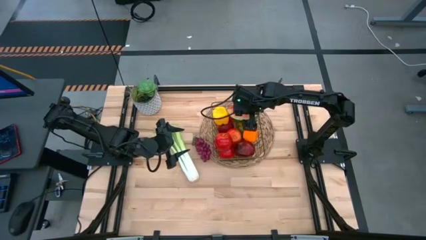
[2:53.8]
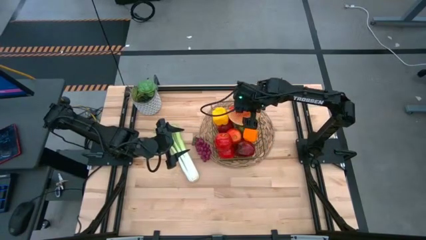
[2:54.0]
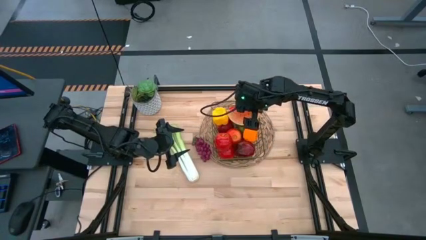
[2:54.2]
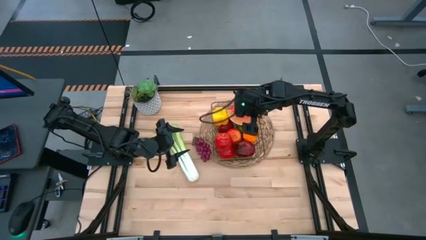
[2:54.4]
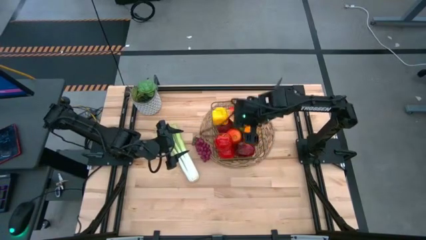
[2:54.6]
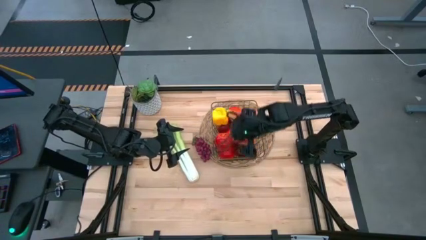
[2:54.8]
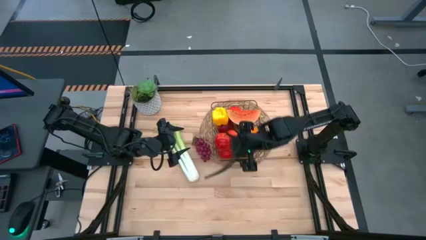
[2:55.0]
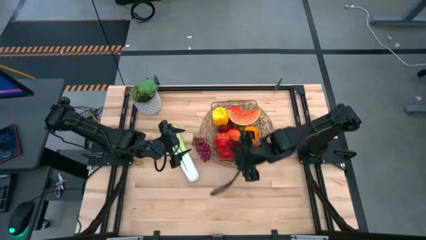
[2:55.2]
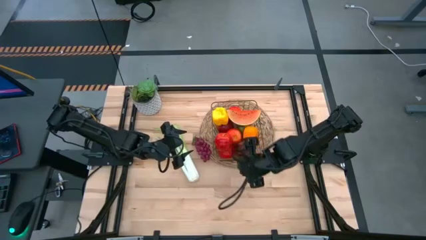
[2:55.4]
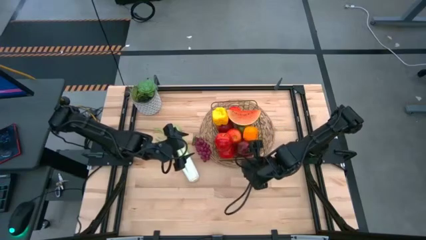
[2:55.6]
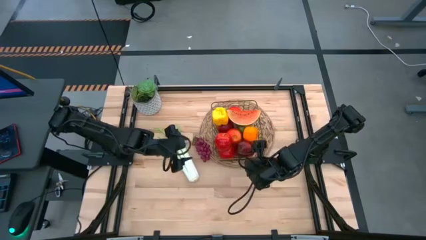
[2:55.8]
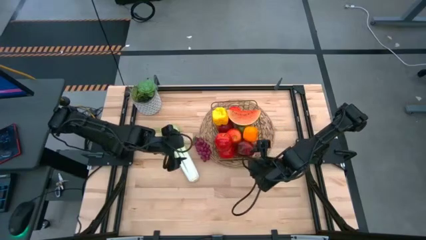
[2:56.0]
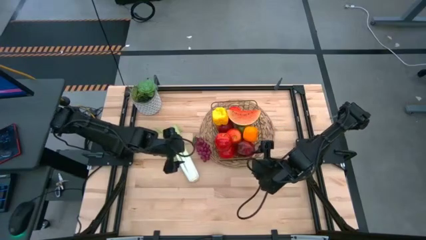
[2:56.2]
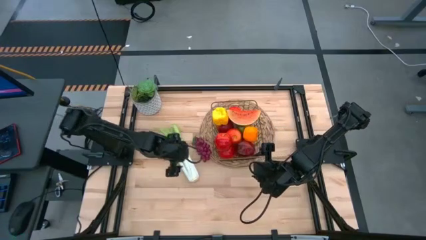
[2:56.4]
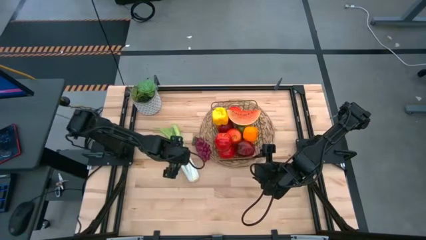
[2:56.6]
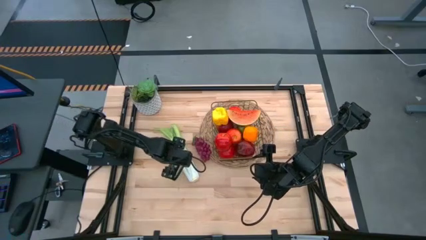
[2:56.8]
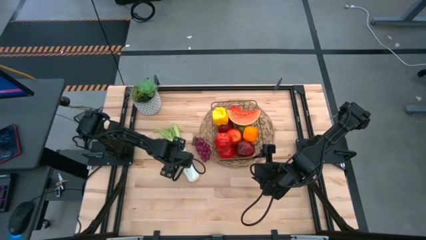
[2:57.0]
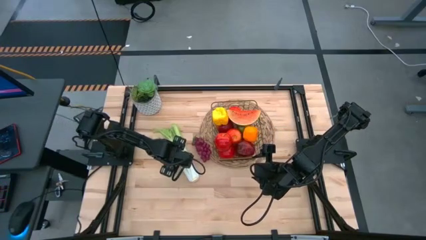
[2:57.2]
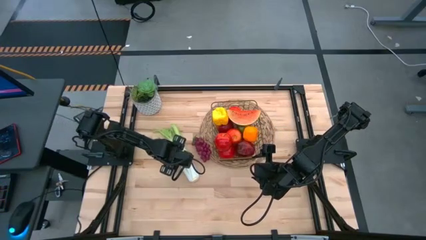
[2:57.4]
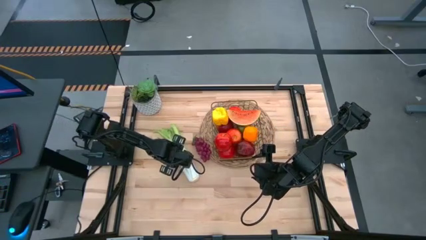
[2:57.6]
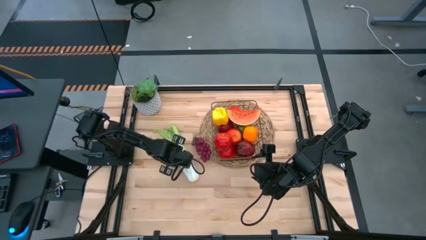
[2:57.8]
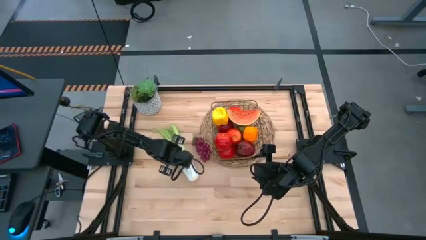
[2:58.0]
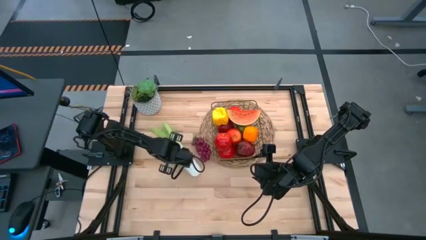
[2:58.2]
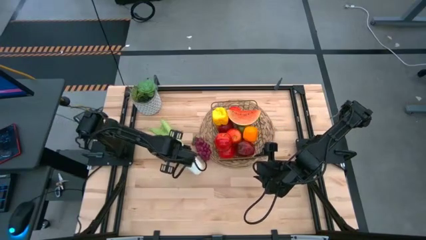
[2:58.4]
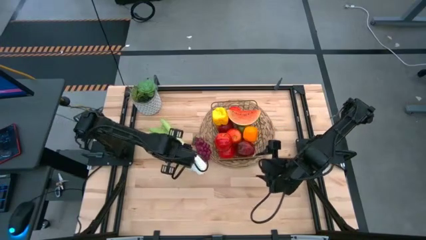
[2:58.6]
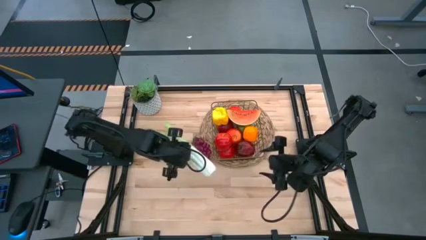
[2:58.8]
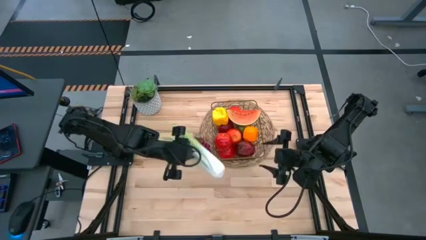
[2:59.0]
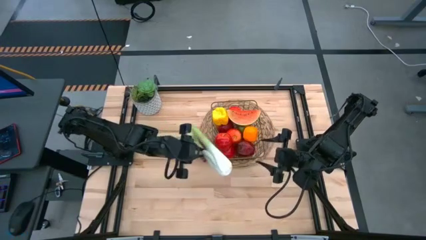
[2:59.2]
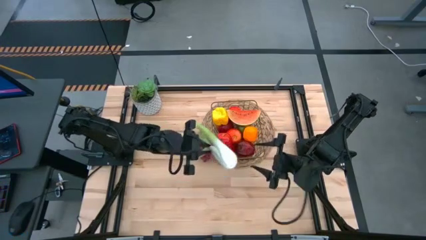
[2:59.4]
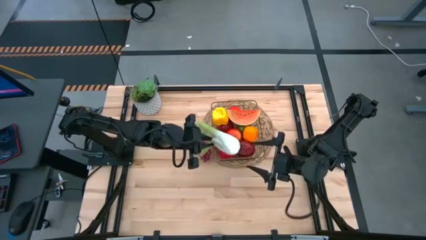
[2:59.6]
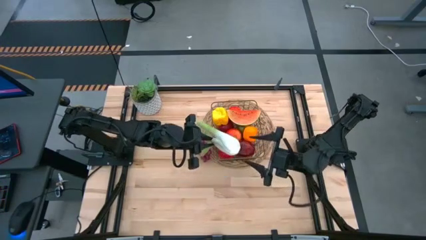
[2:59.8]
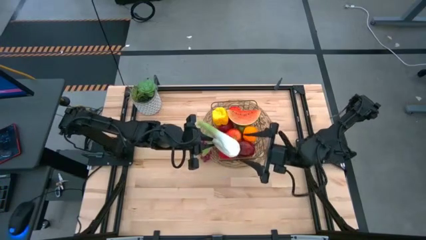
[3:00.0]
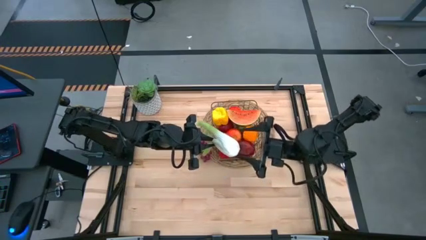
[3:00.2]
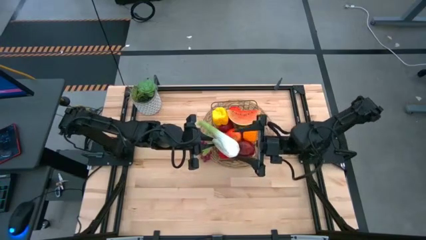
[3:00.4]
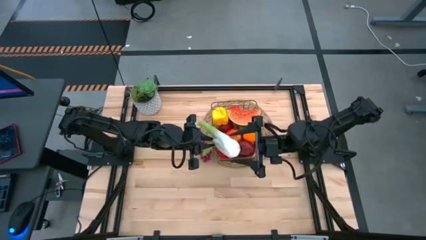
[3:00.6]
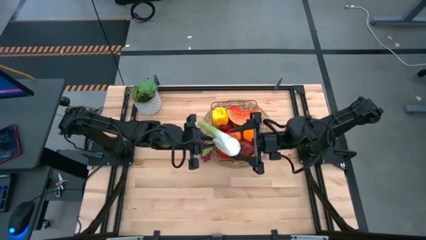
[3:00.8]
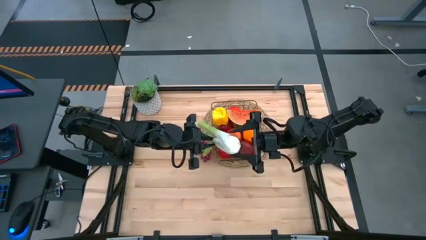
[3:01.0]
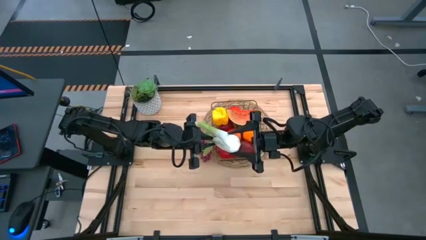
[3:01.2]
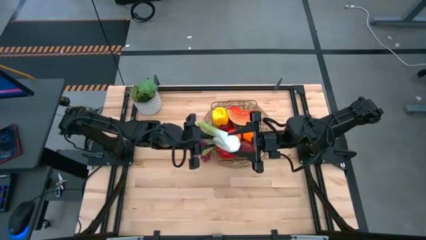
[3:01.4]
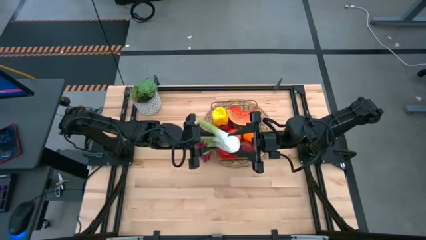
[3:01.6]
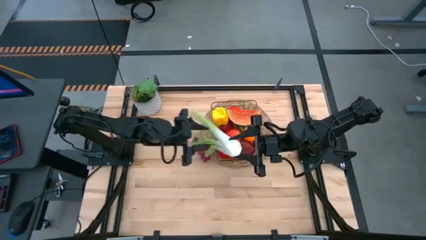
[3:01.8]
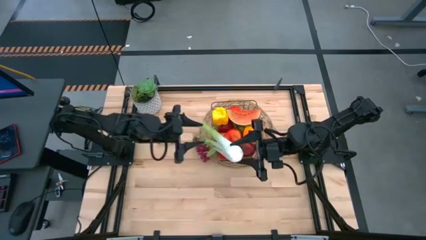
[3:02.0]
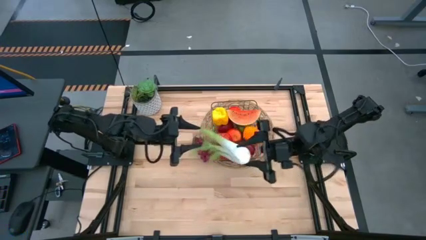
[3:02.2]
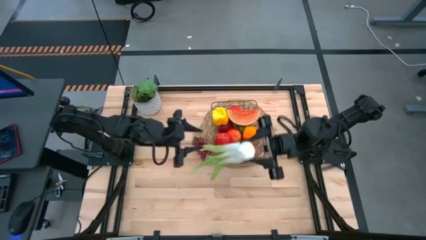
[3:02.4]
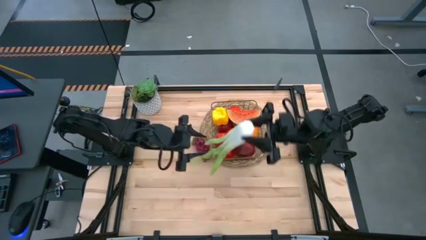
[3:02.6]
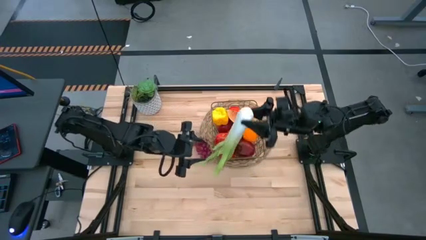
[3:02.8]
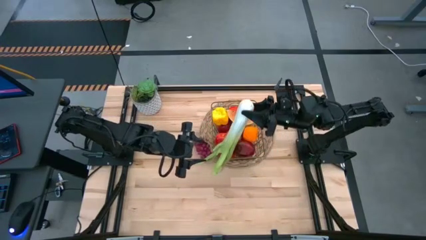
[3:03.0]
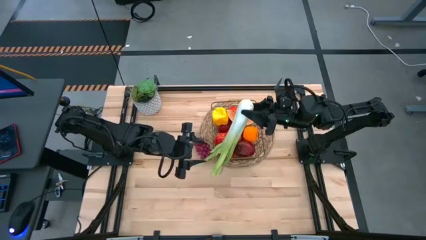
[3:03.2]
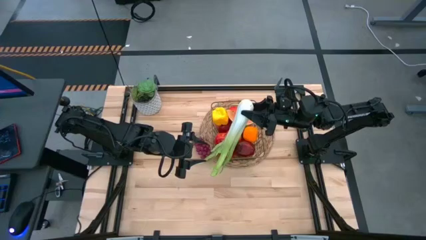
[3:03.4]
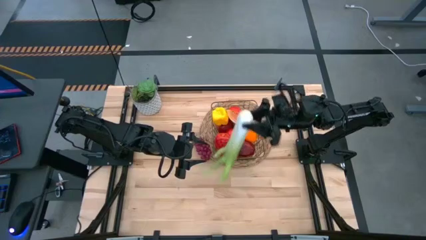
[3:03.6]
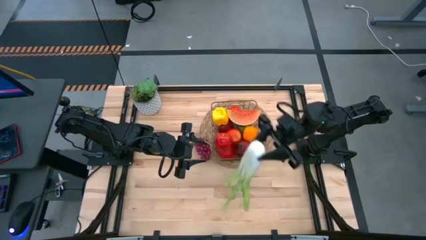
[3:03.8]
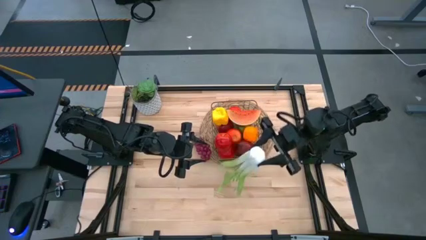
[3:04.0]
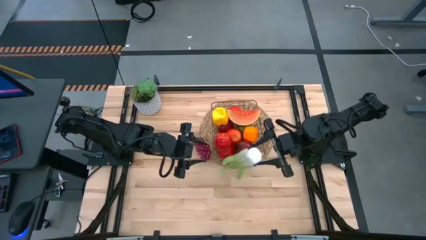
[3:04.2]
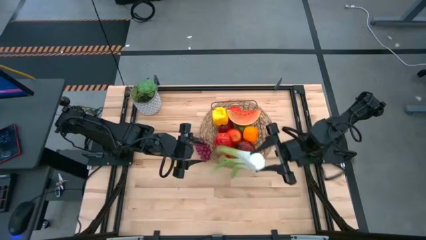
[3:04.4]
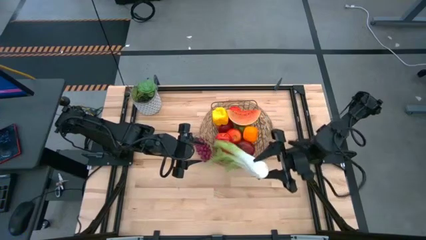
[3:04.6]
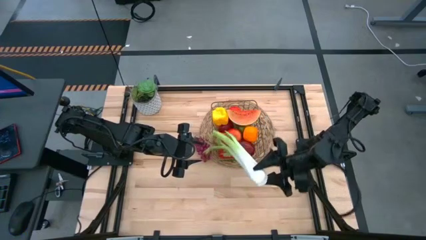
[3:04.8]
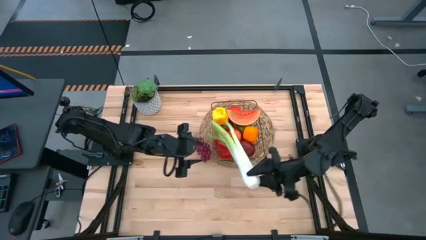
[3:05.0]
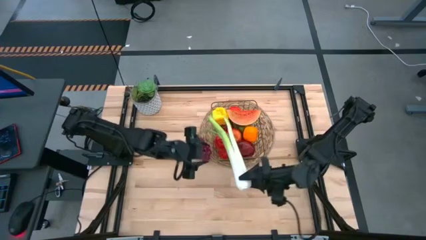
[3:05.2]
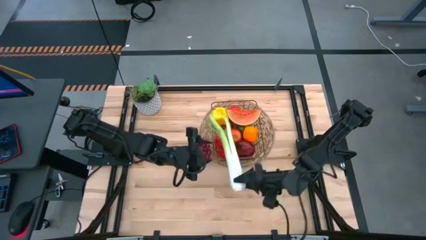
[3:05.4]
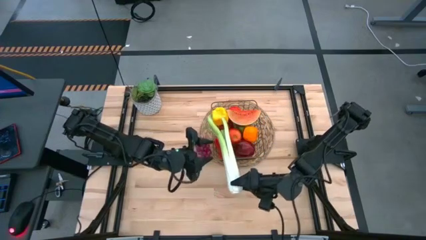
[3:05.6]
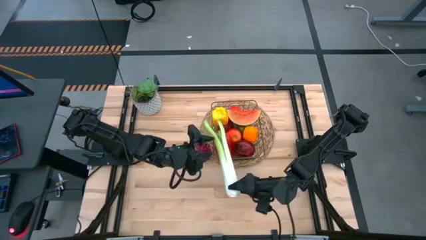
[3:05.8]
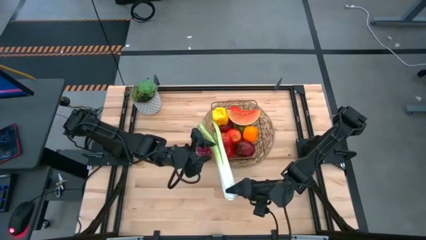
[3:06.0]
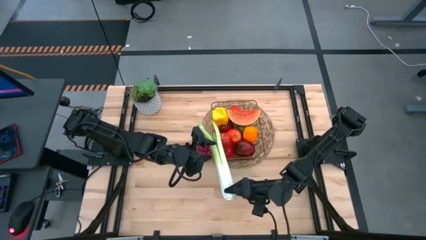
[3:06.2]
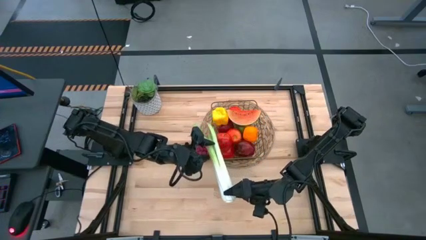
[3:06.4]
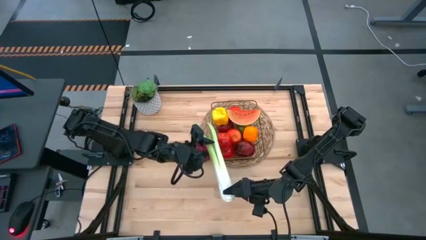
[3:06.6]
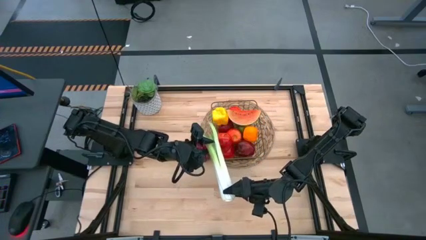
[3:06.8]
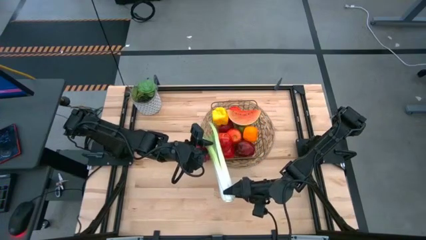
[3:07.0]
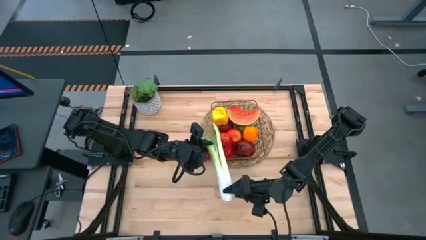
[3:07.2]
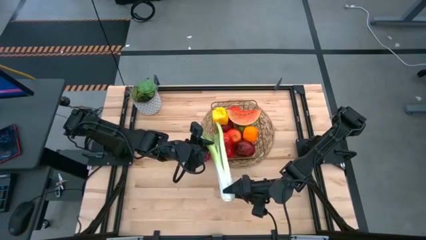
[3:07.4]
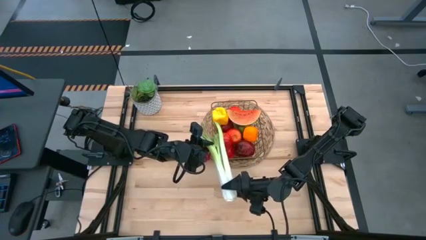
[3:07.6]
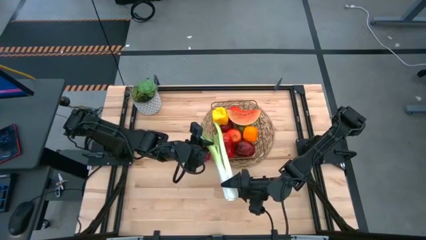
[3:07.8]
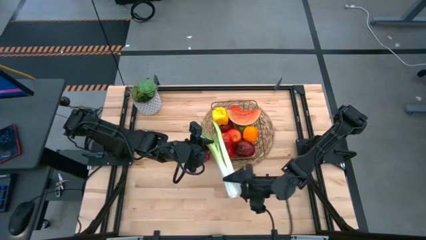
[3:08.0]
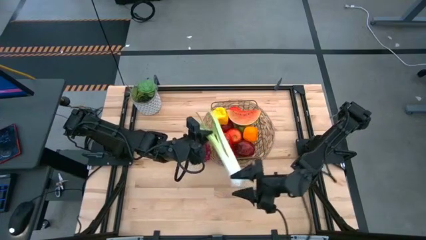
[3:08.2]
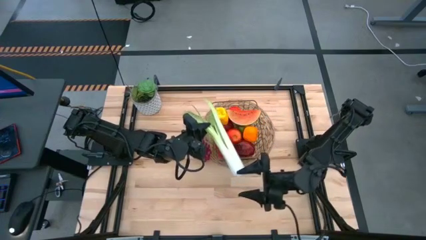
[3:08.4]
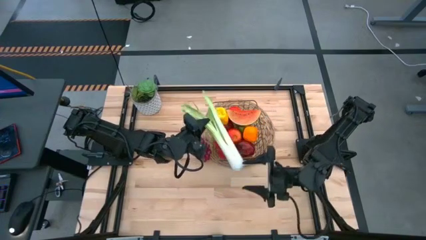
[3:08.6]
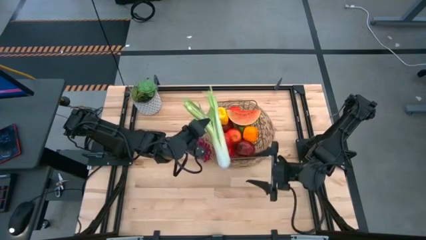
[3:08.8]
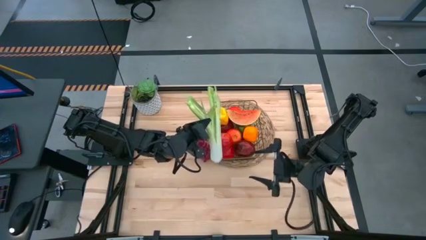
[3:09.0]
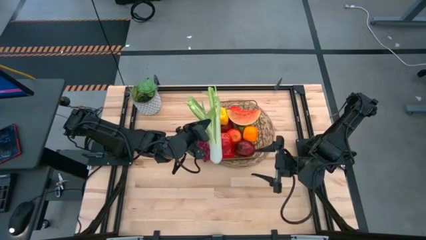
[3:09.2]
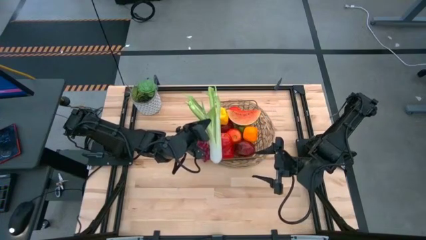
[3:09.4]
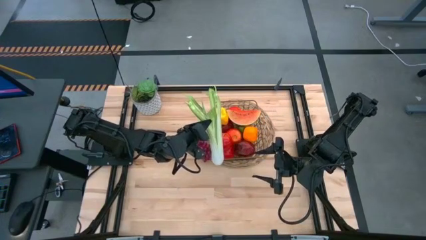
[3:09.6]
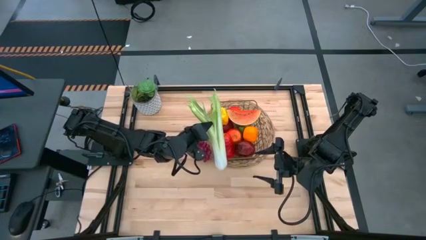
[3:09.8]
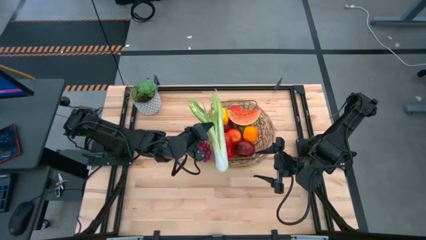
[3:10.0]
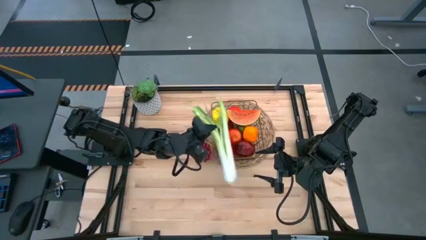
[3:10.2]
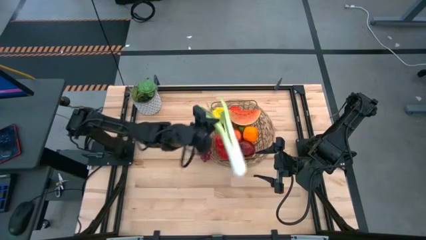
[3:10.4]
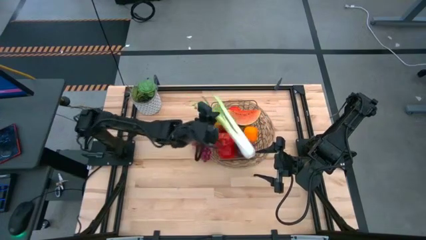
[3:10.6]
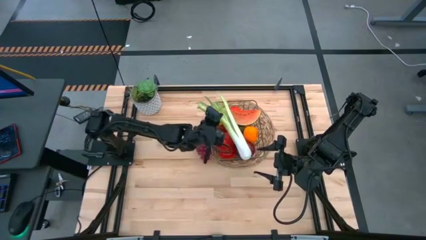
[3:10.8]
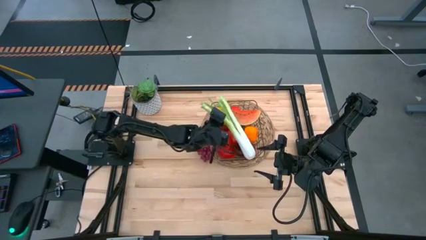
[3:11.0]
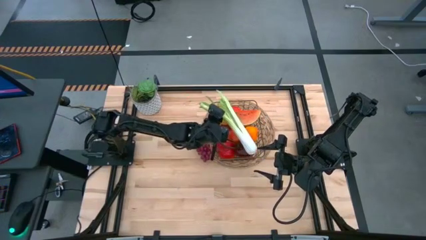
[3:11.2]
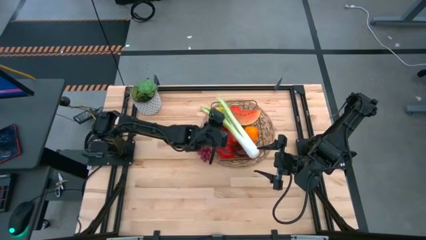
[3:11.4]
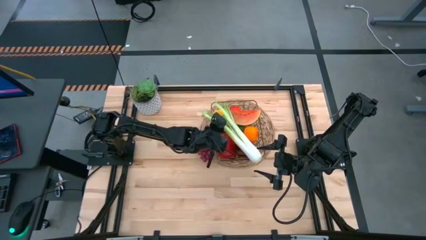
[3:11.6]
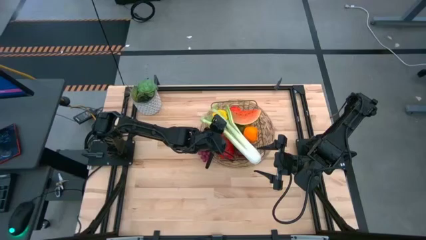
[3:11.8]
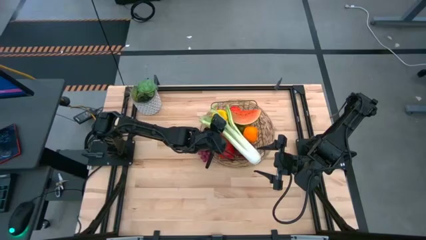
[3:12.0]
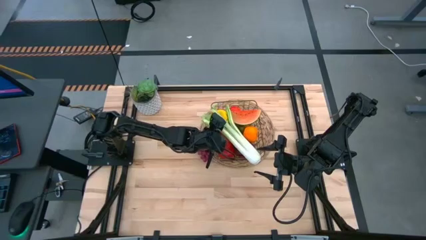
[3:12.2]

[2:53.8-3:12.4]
Task: Build produce basket
Put the spring onions into the wire basket
